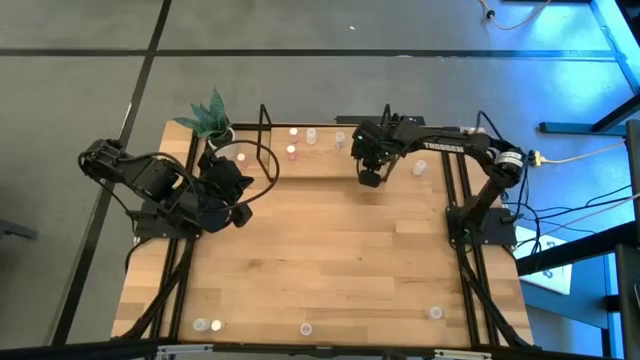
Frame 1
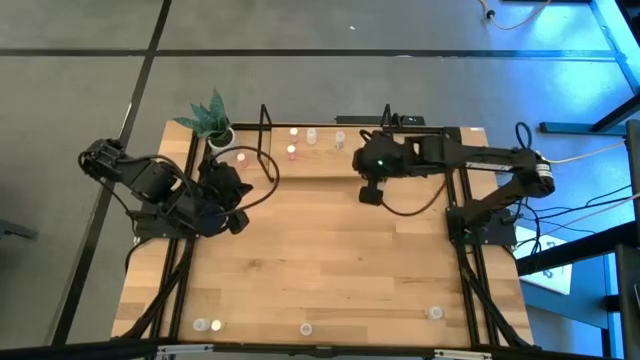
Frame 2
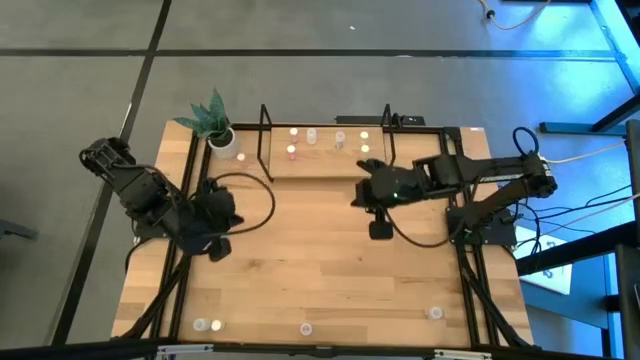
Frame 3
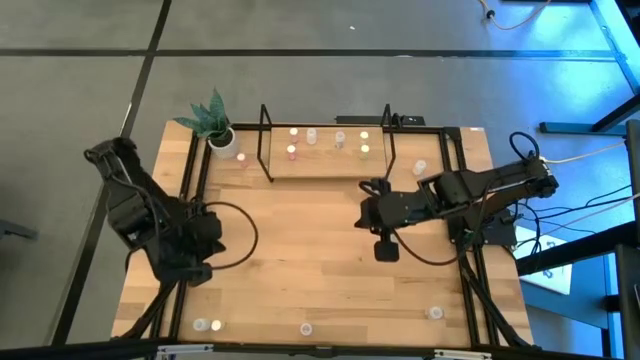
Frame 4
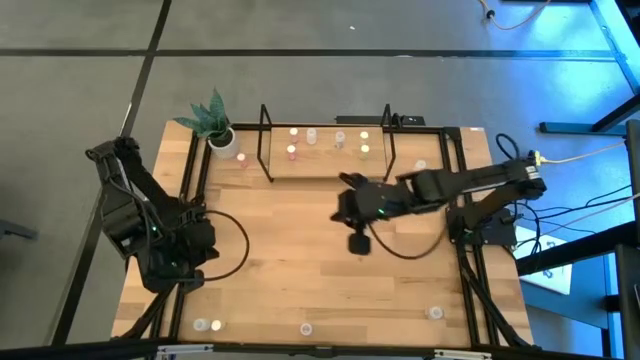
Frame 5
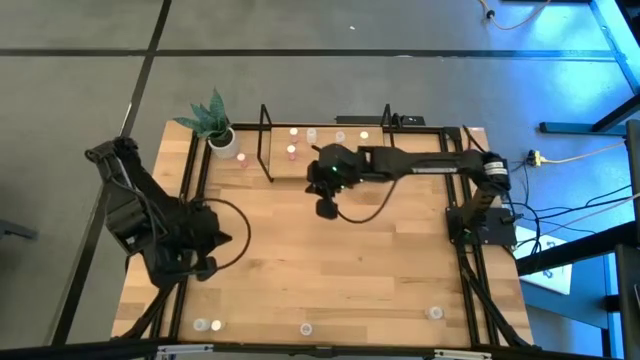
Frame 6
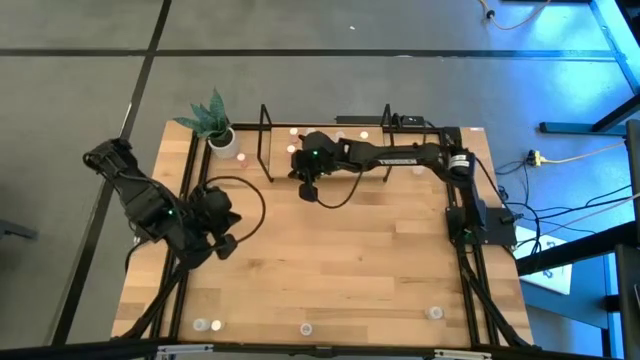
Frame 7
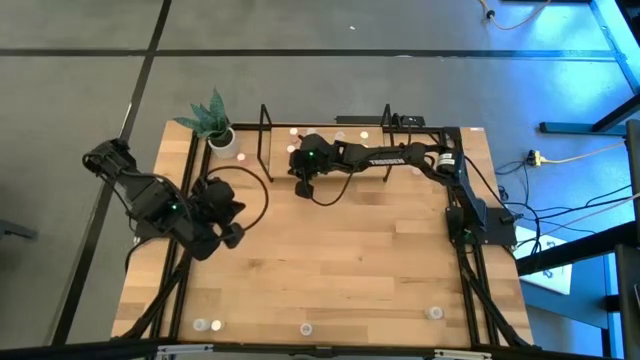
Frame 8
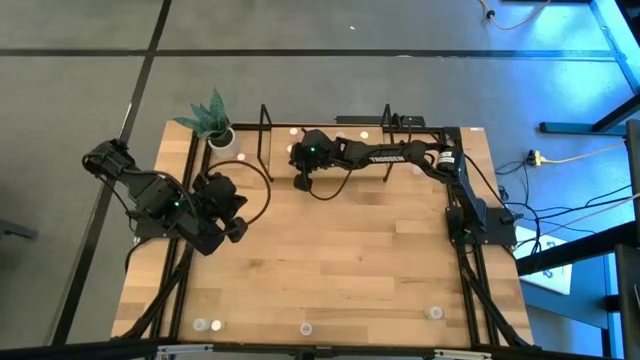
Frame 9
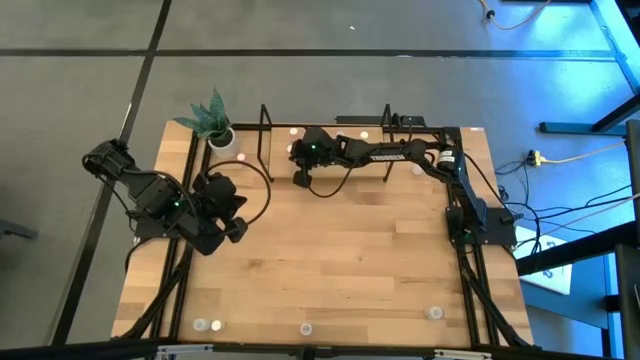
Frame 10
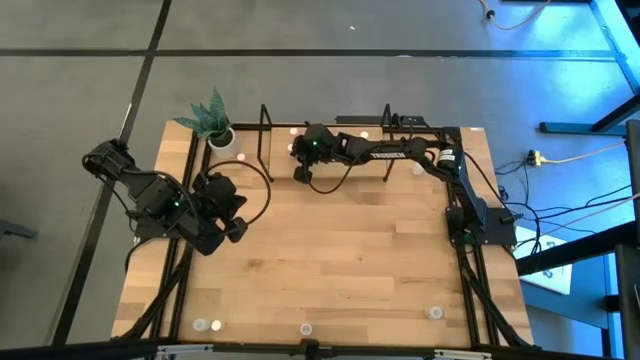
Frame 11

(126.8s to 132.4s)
Task: Pick and place medicine bottles onto shelf by color
Adjust the pink pill bottle on the shelf

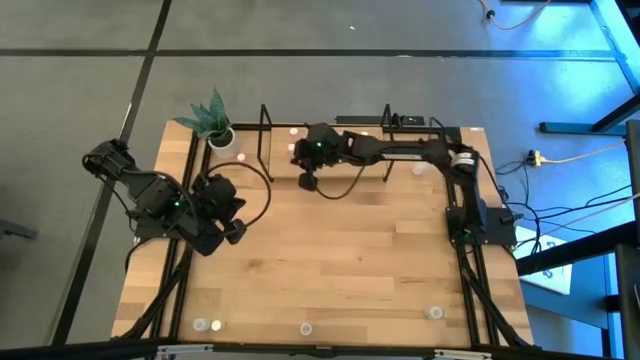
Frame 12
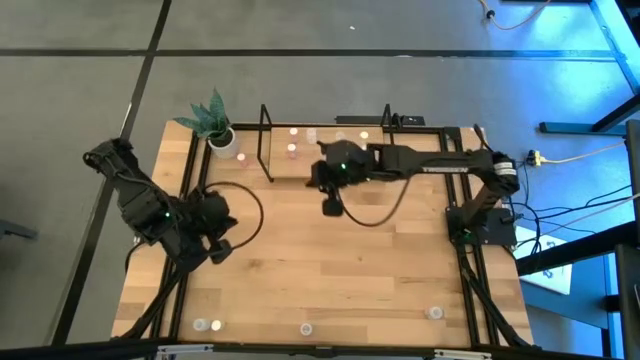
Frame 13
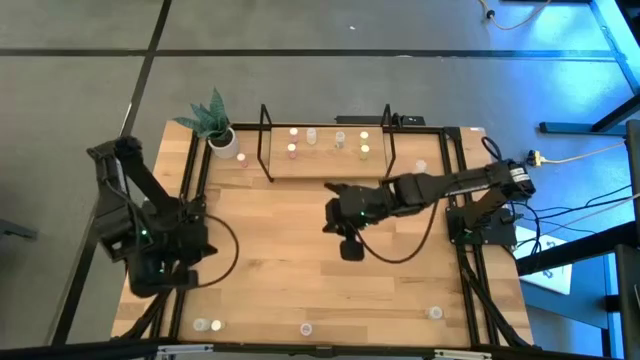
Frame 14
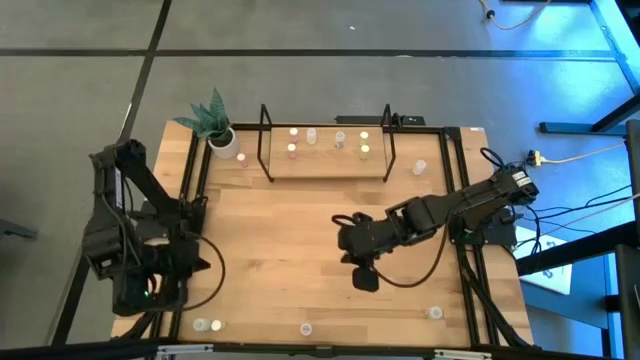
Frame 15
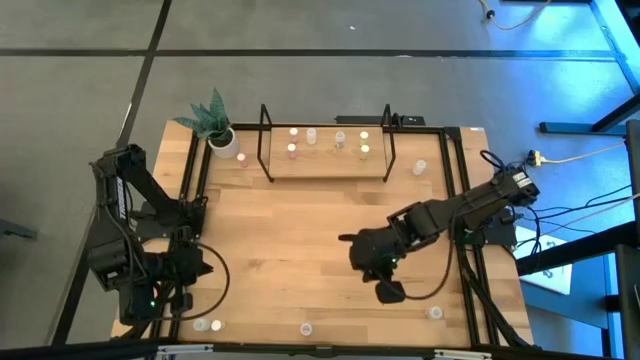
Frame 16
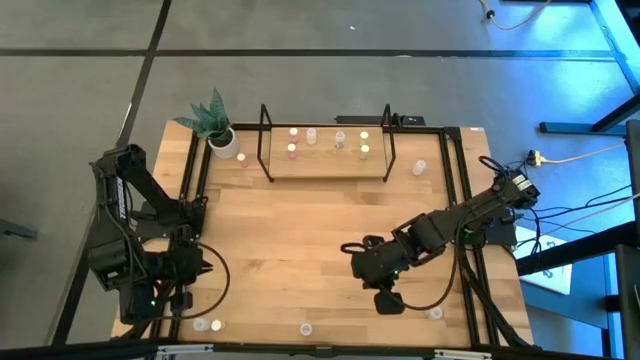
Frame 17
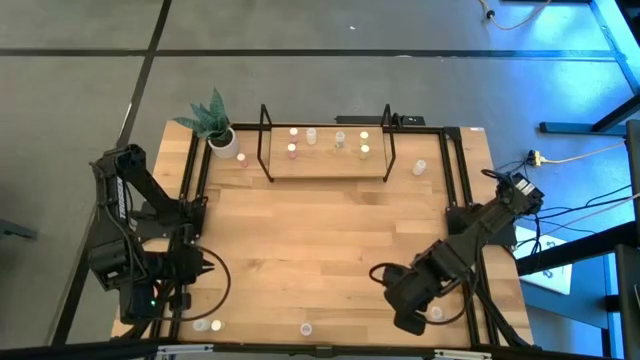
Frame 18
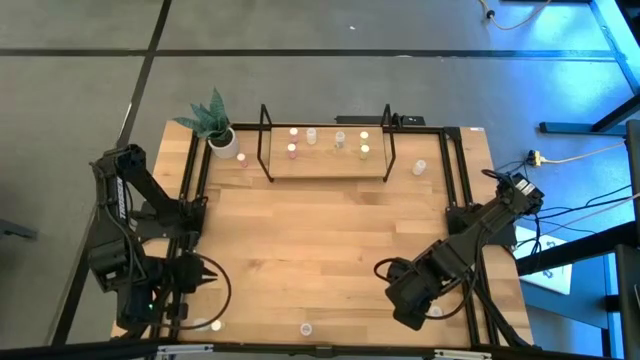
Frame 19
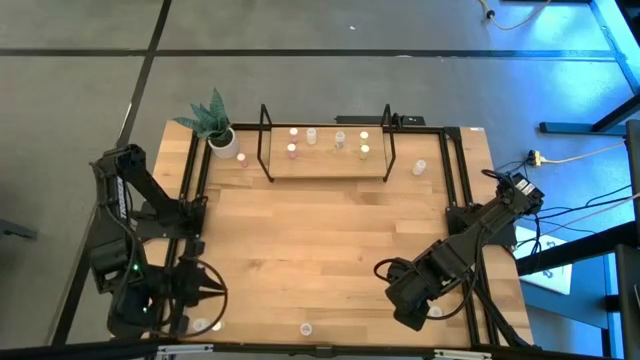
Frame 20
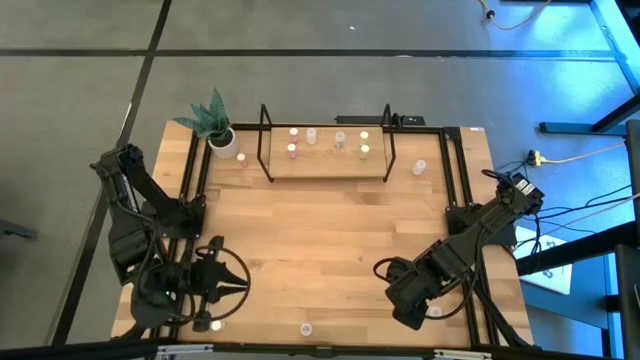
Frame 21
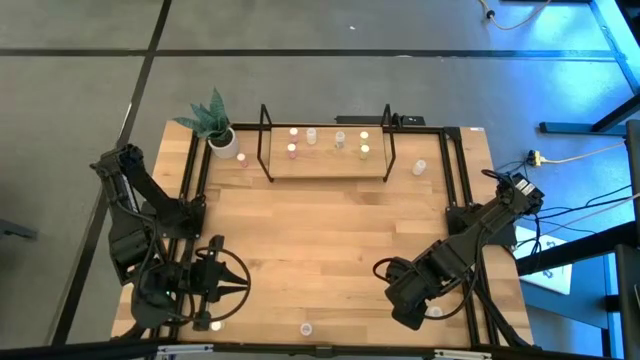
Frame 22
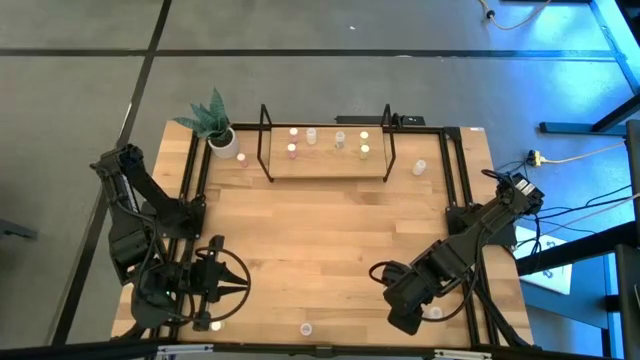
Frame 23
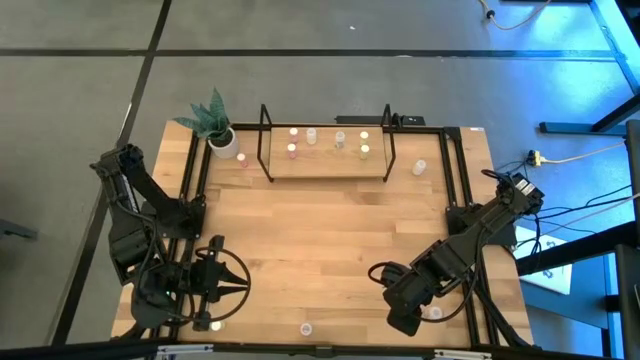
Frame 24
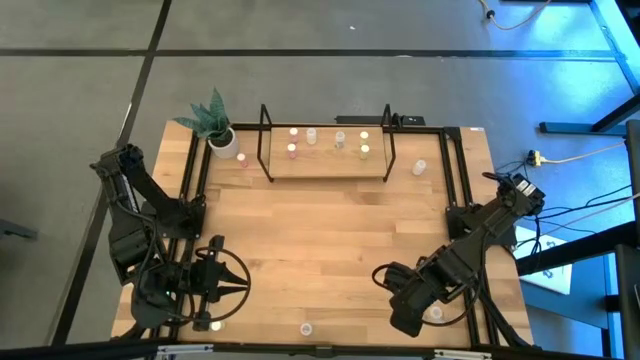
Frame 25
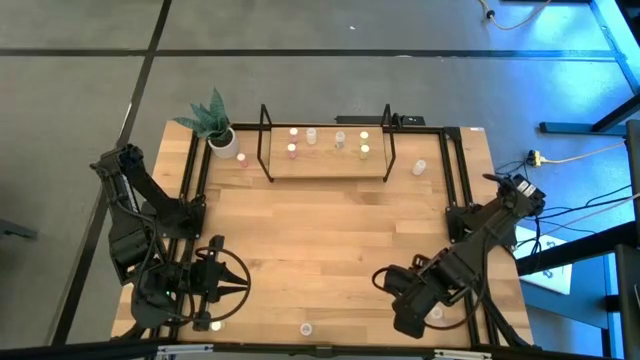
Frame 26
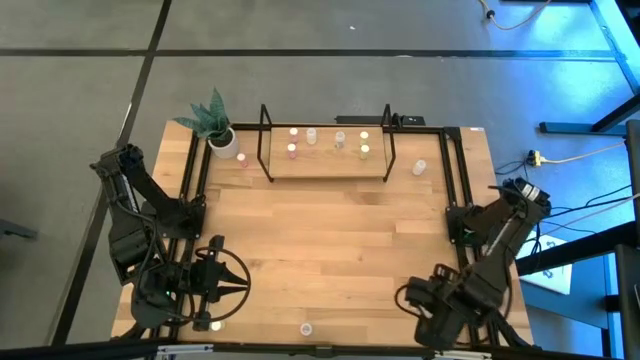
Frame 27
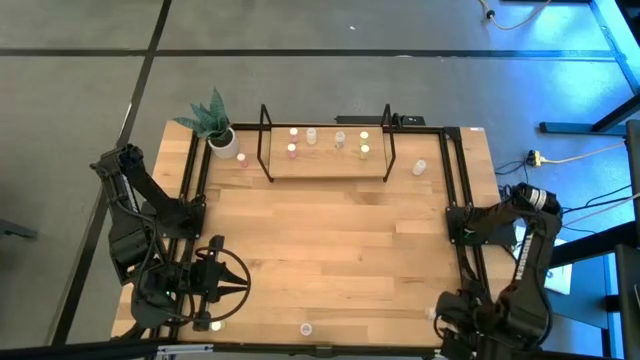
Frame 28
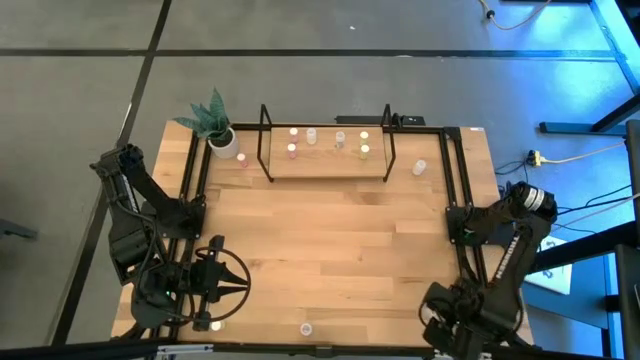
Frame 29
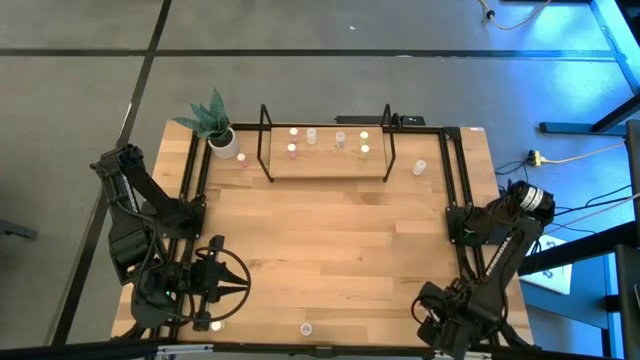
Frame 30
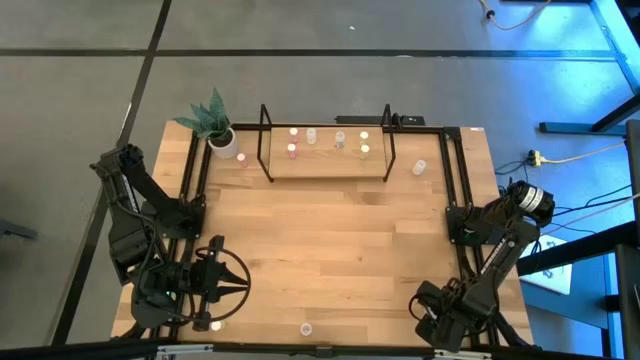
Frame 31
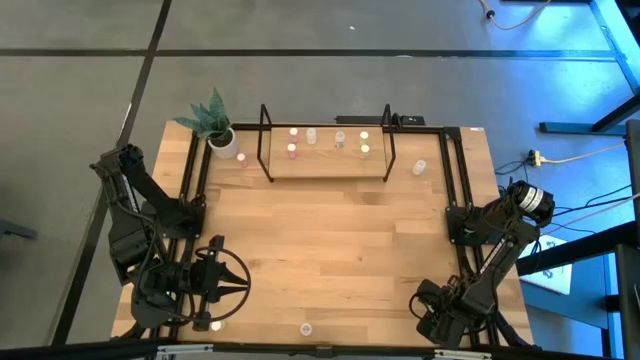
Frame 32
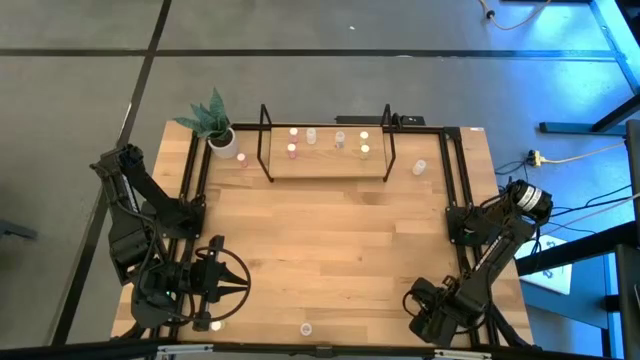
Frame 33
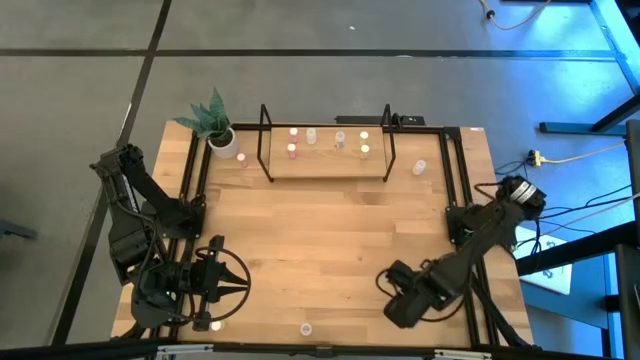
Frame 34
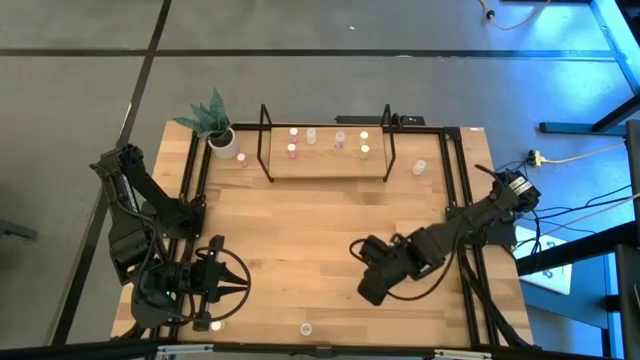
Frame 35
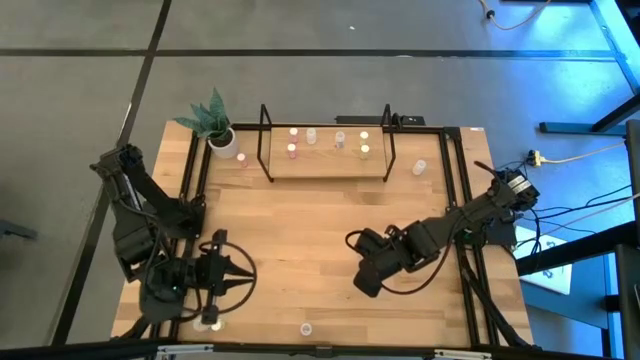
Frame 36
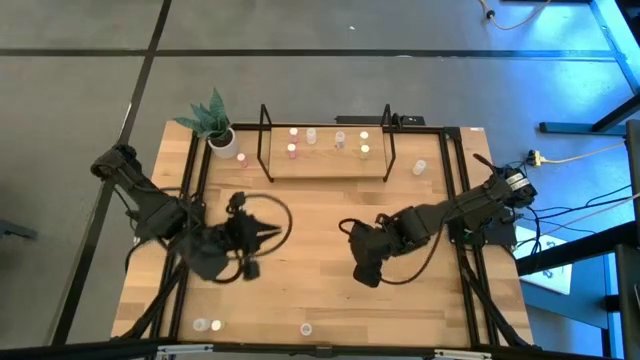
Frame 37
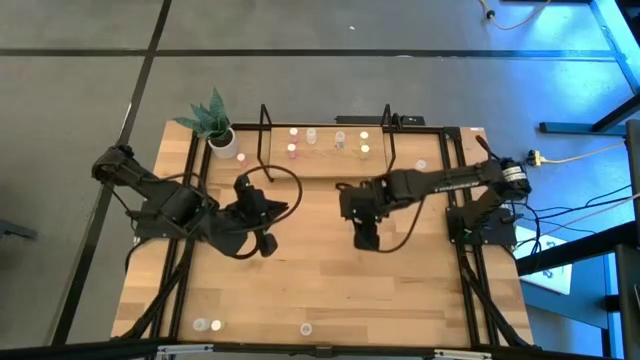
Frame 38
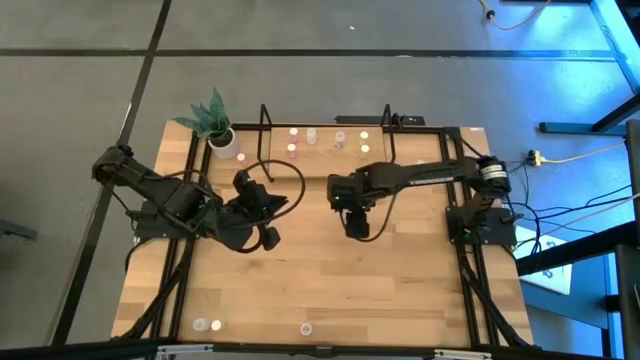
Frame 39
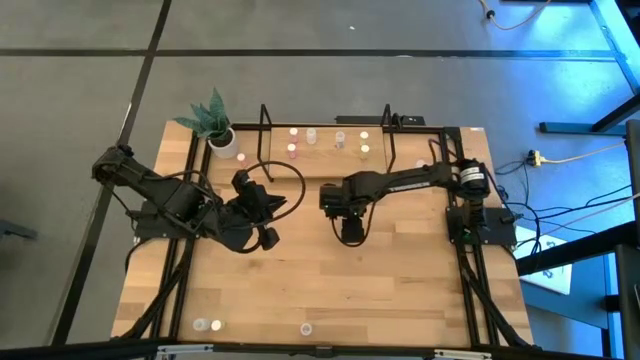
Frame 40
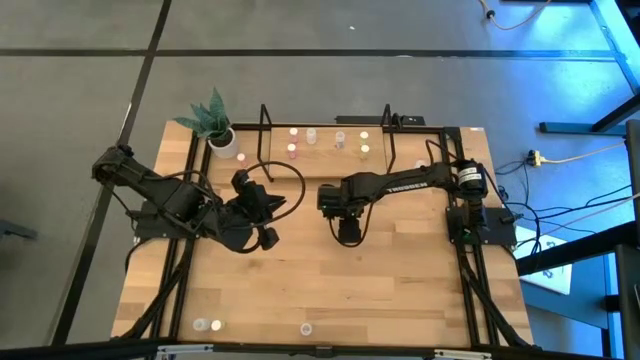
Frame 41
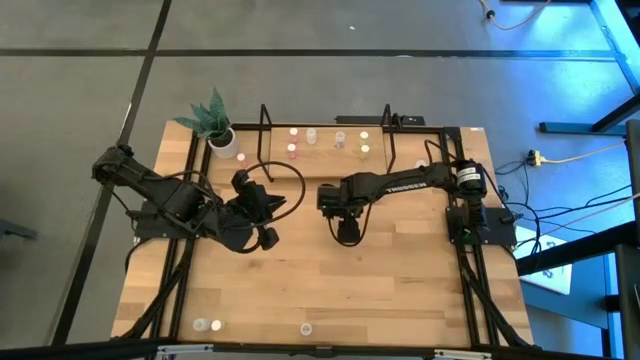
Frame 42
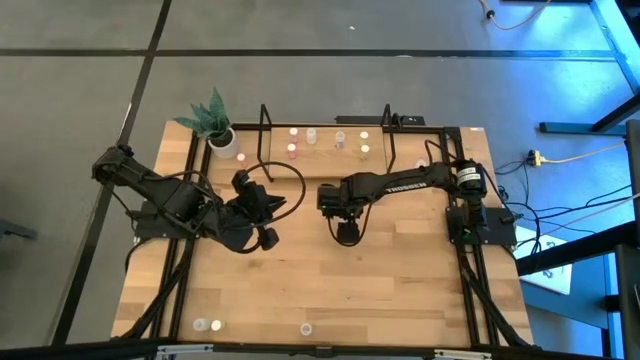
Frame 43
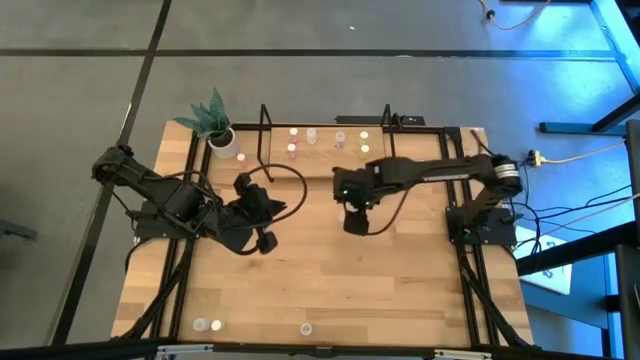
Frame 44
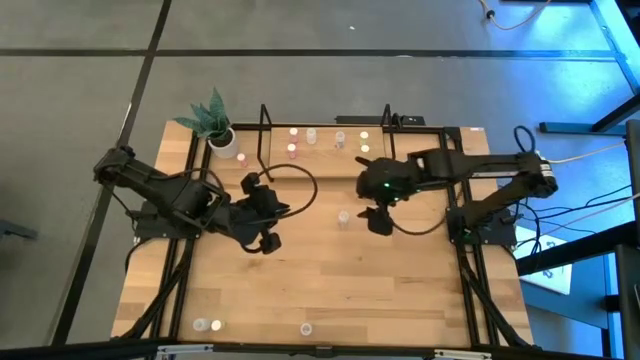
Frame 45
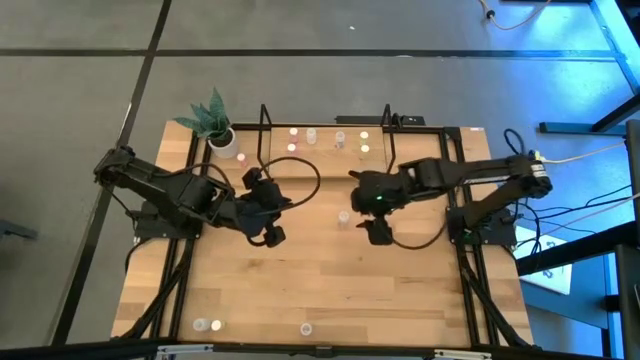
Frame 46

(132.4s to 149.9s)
Put the top transparent pill bottle on the shelf aligned with the other transparent pill bottle
